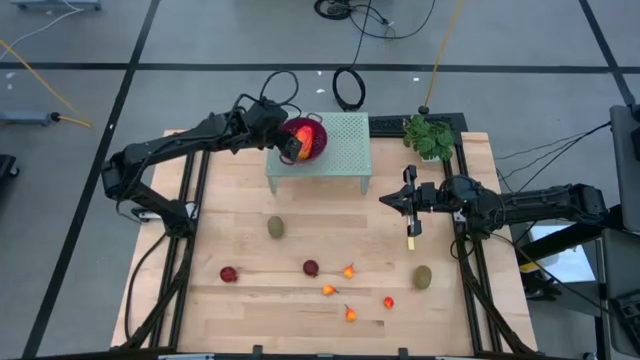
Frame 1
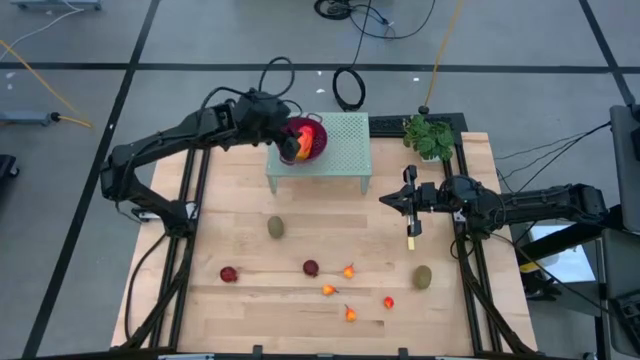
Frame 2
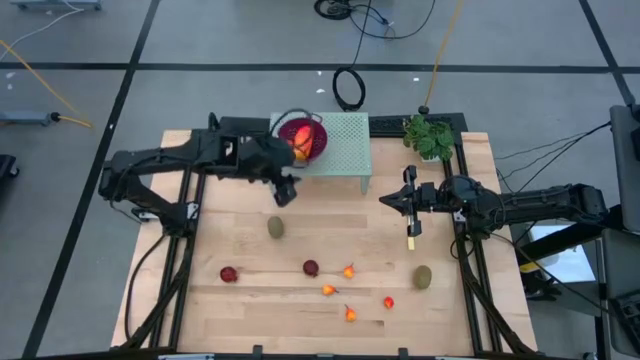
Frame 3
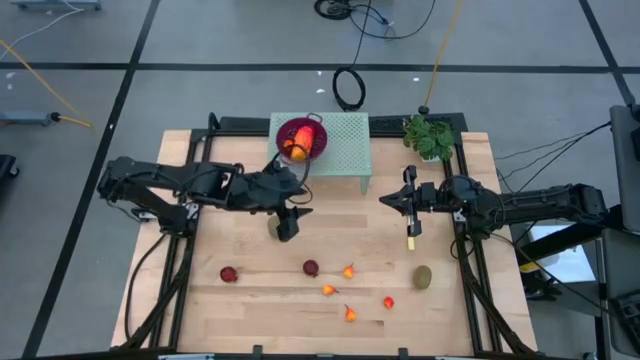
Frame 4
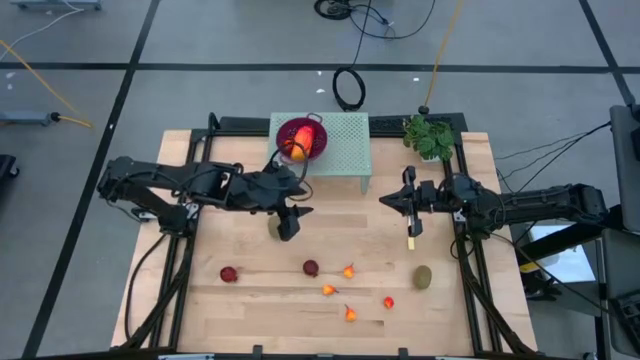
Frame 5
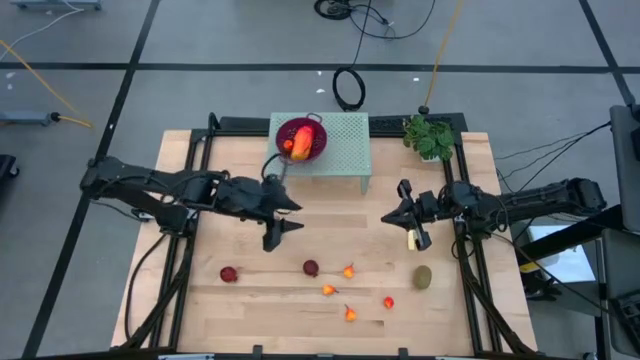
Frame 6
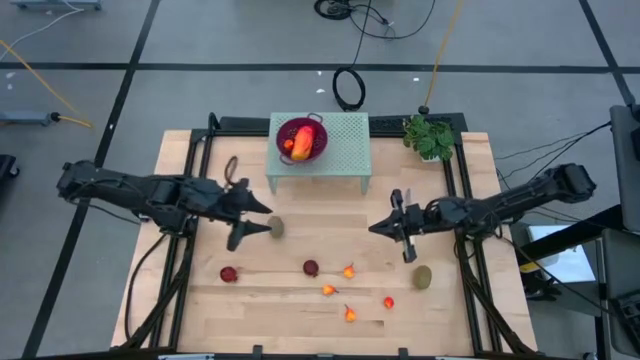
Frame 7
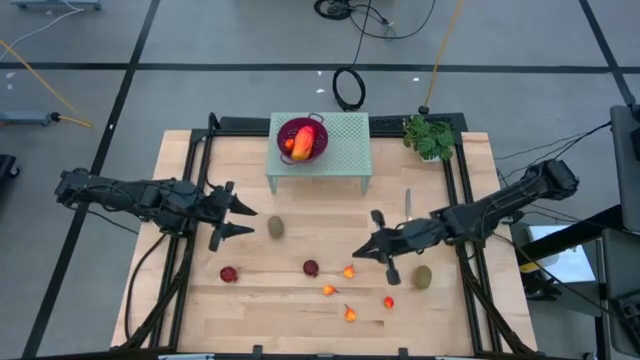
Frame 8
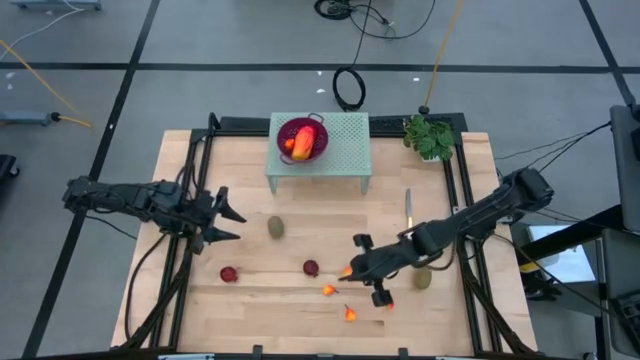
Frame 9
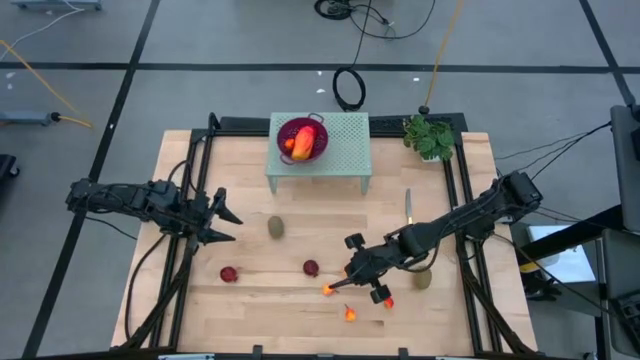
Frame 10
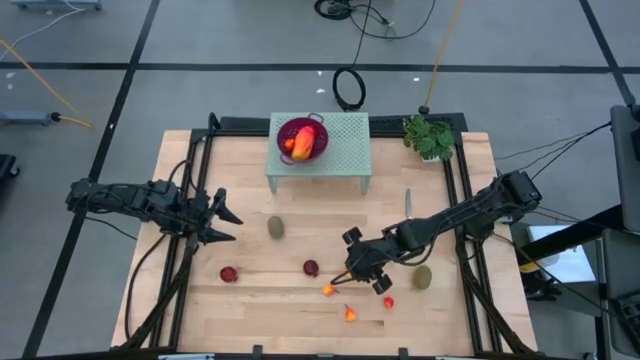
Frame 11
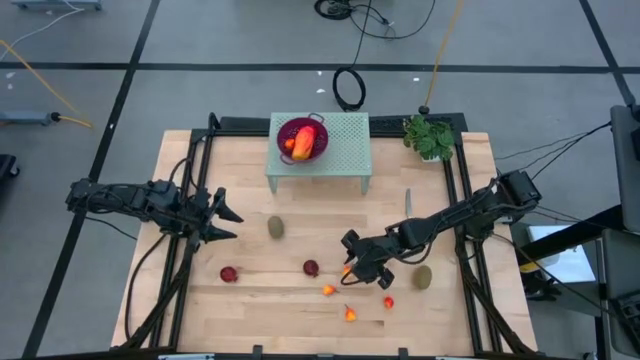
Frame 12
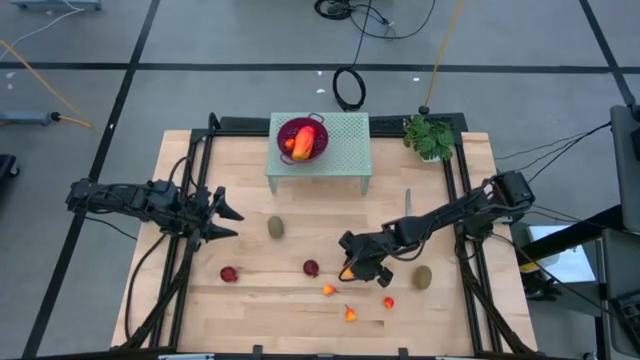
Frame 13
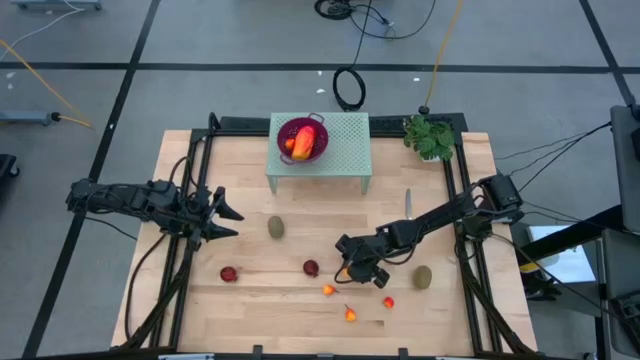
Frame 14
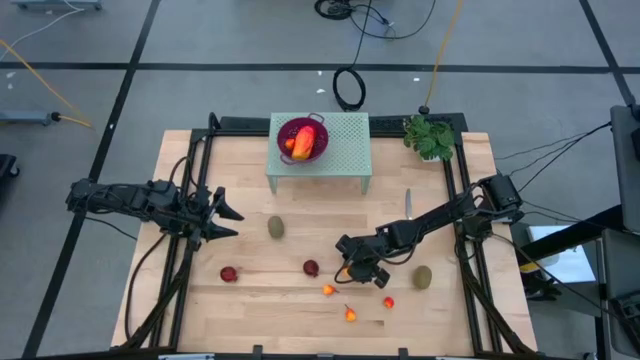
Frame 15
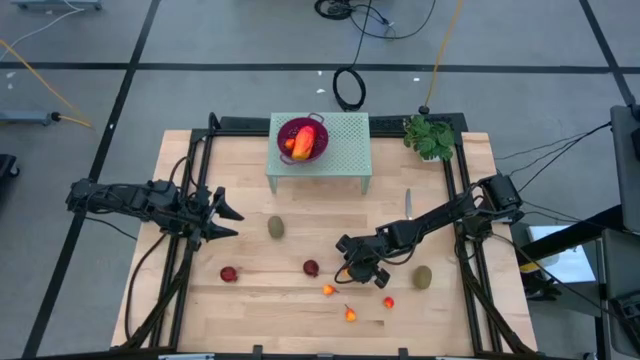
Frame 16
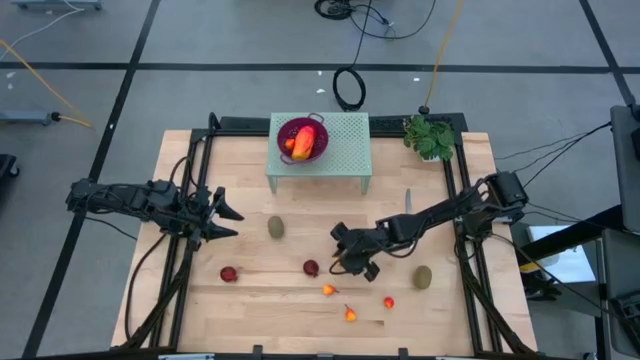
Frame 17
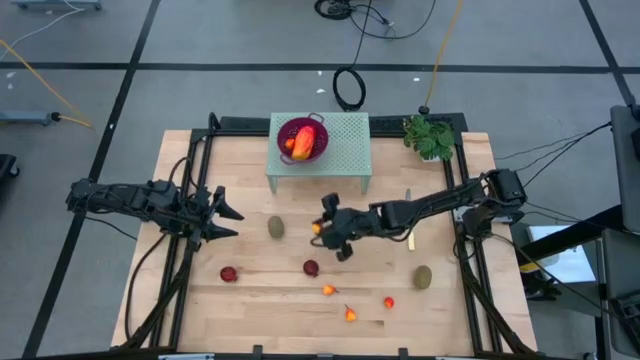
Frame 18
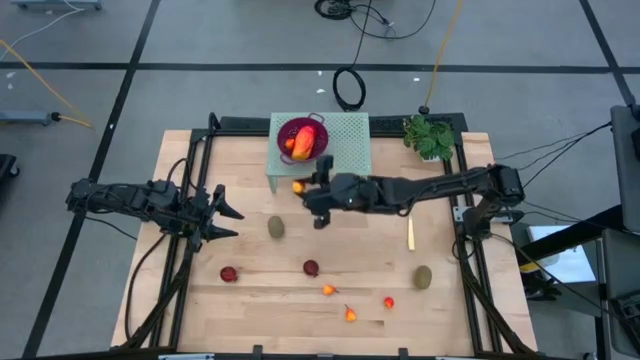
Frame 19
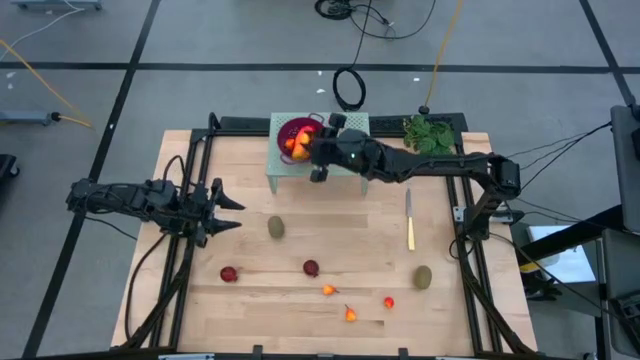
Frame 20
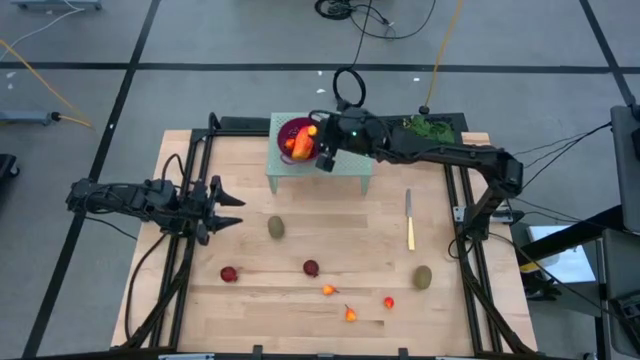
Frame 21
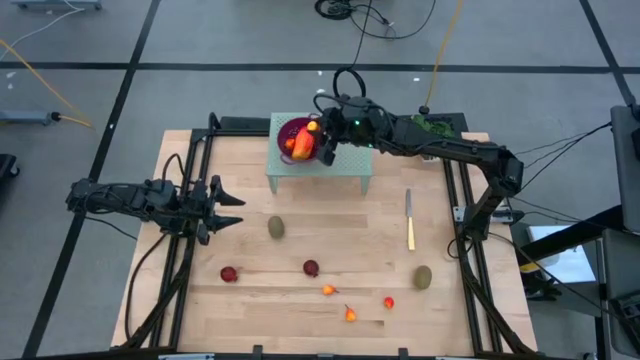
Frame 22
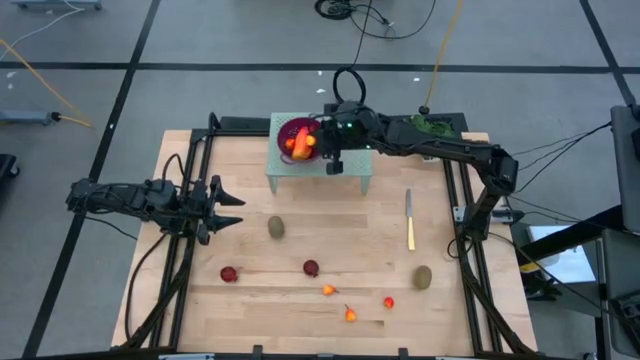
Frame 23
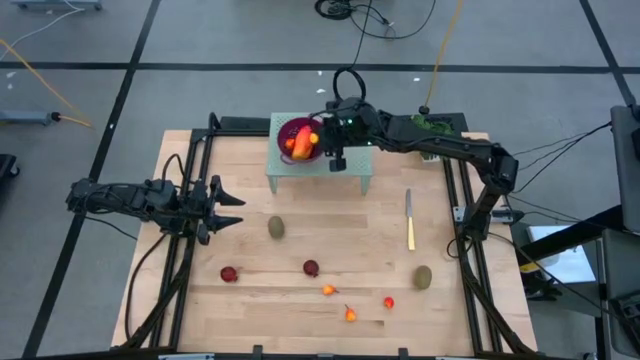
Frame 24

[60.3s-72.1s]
Task: Pick & Place Fruit
Put the pear into the violet strainer bowl on the shelf

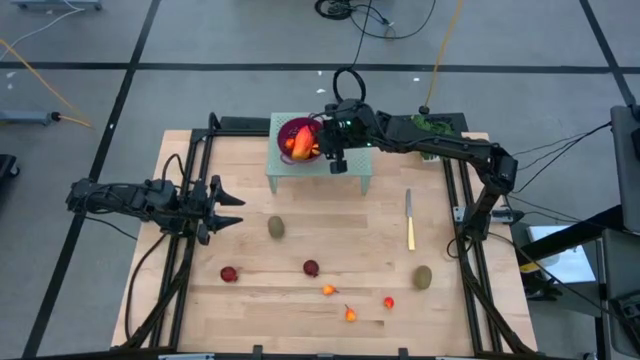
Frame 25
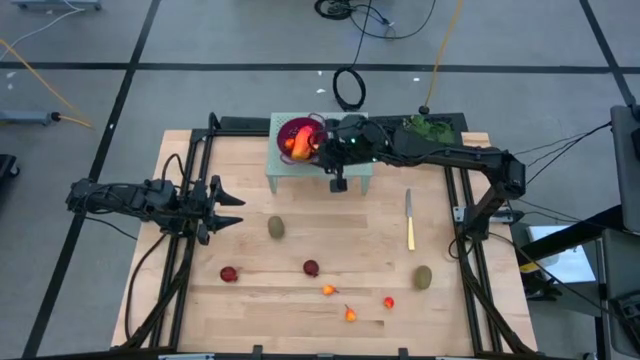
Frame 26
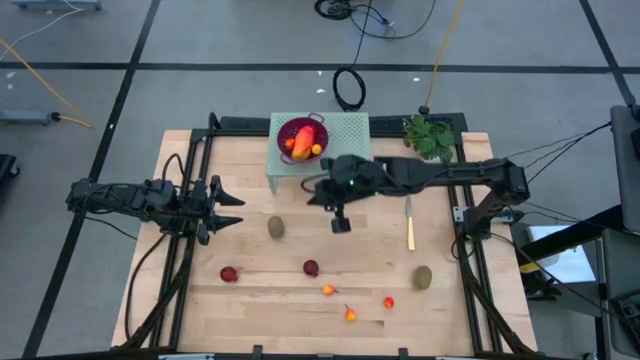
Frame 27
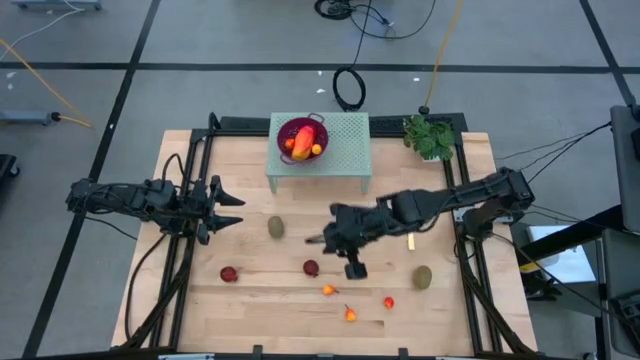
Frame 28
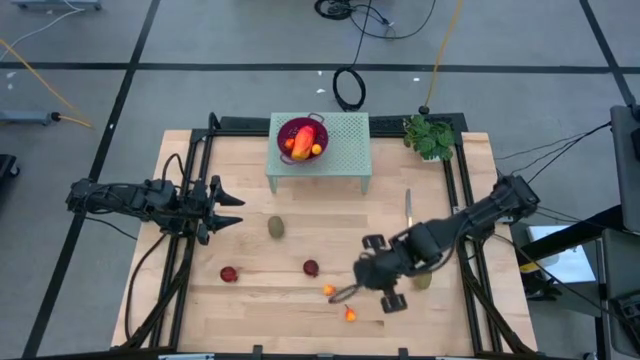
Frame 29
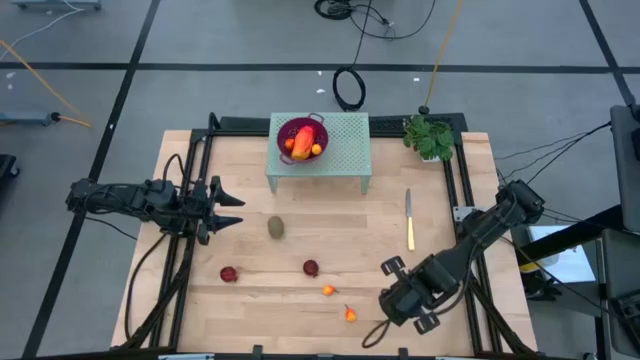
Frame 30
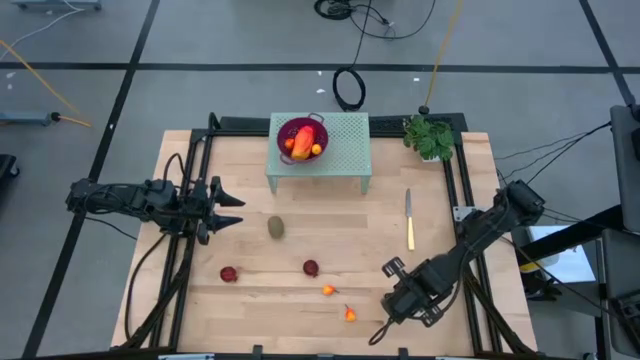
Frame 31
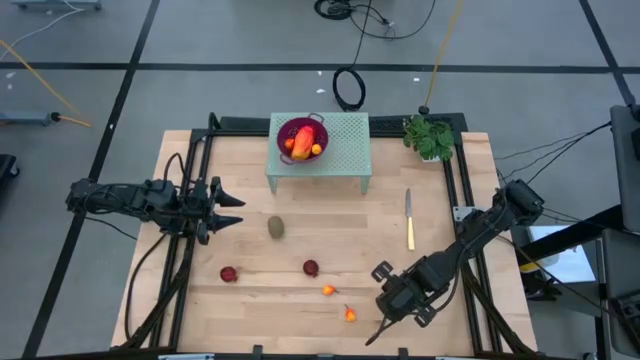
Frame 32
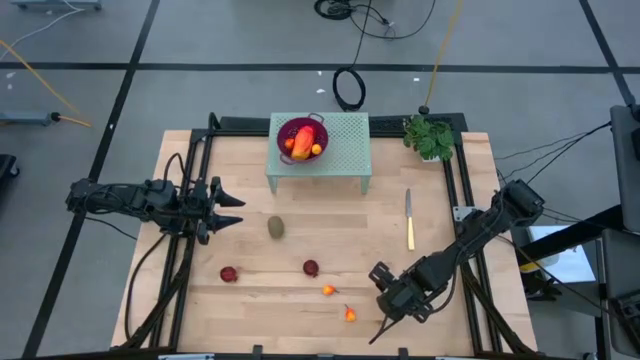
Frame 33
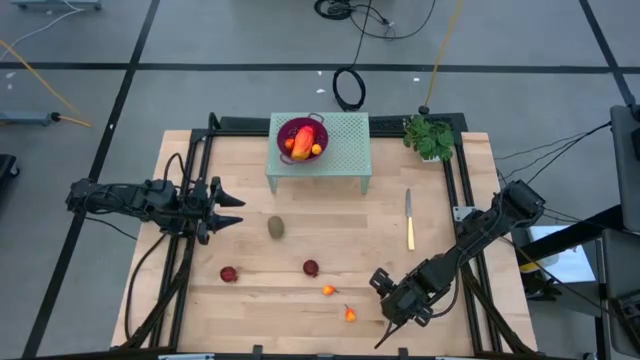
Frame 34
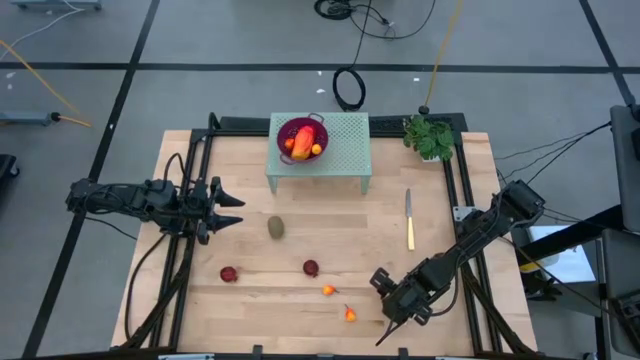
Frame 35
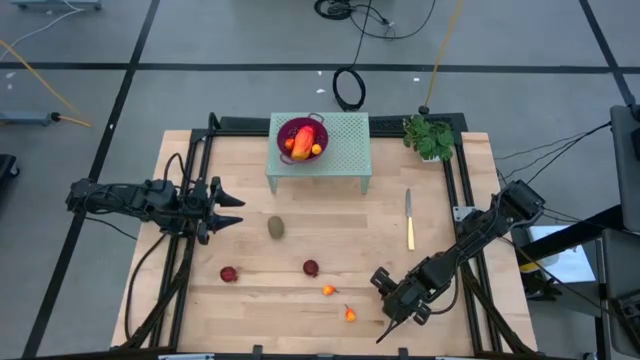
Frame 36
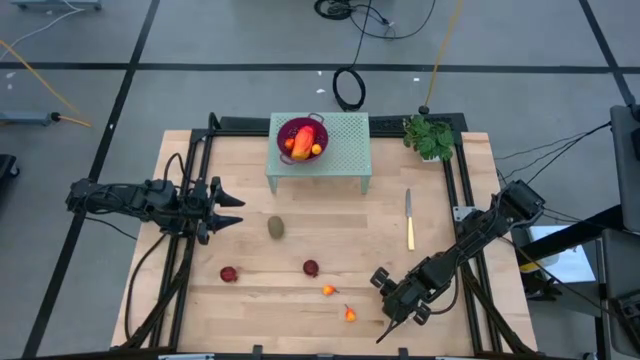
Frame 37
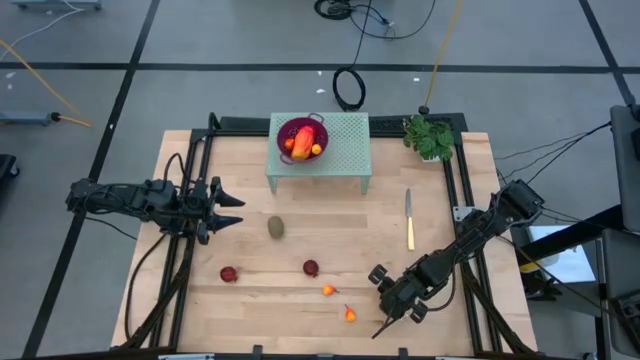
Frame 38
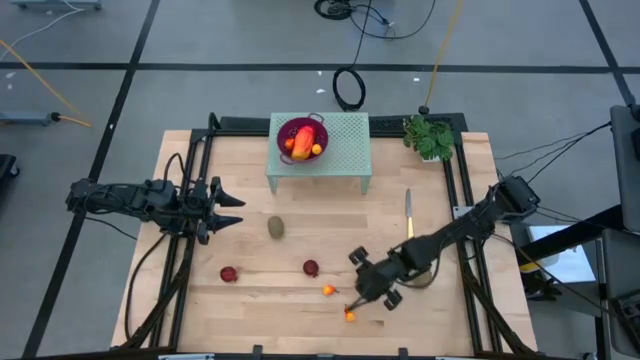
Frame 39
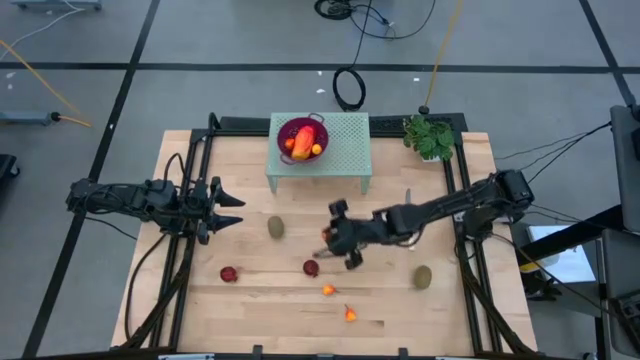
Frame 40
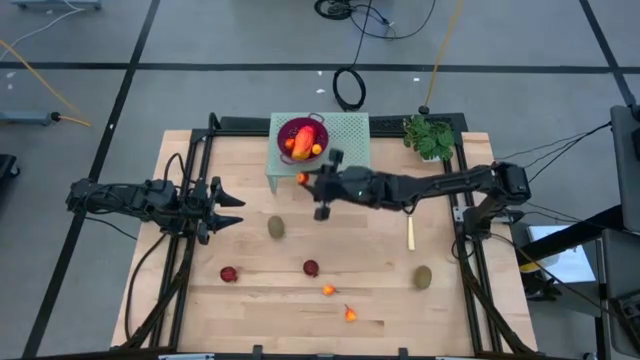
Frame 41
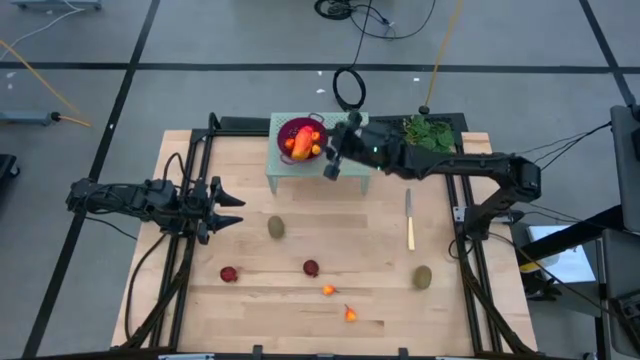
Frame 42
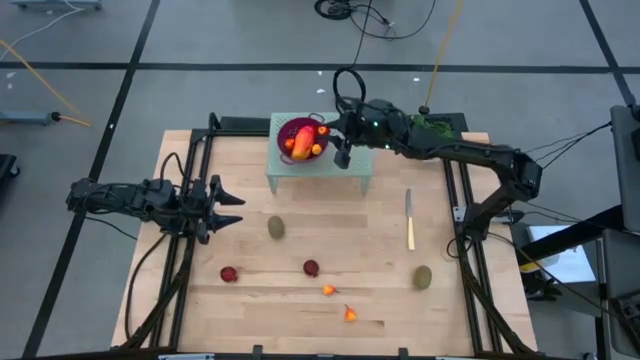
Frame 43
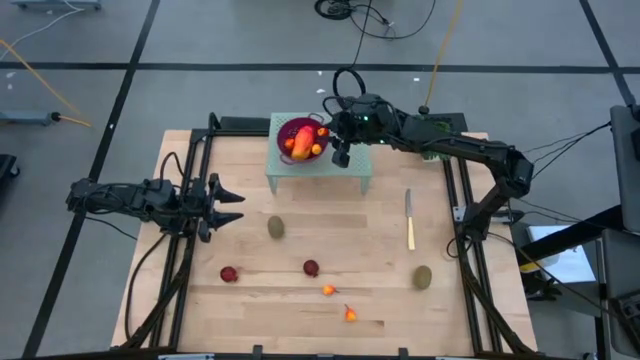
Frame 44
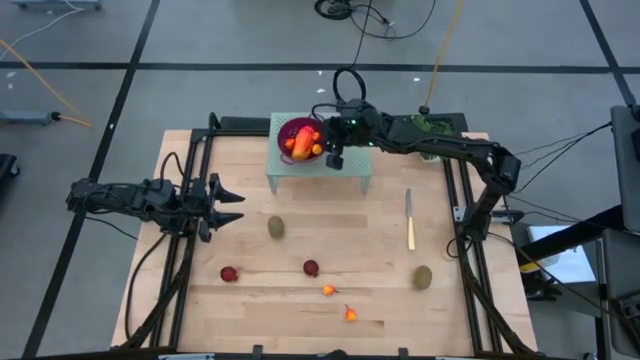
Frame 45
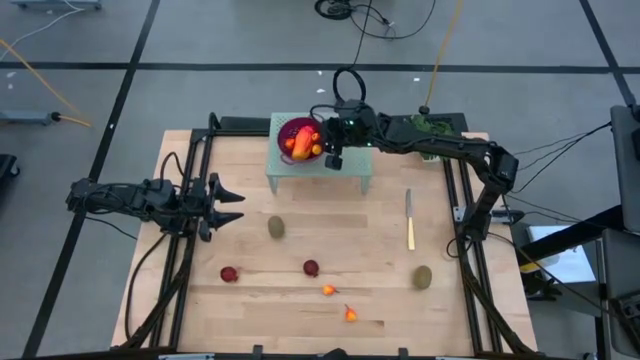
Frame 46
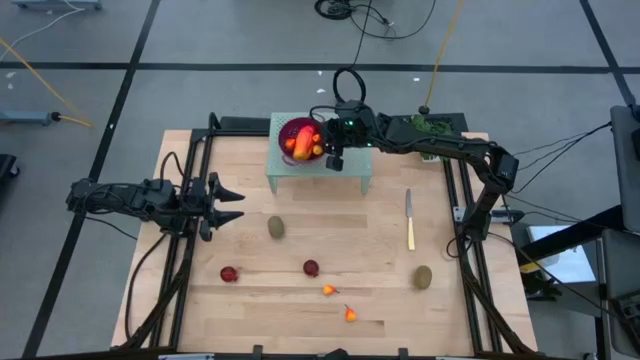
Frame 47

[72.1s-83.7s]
Put the peach into the violet strainer bowl on the shelf
